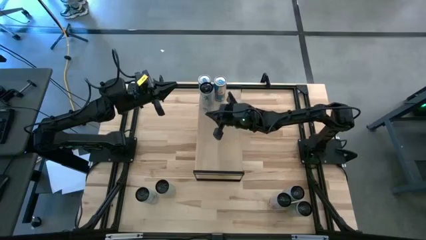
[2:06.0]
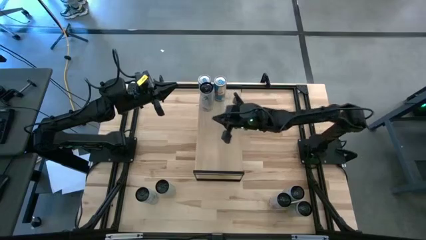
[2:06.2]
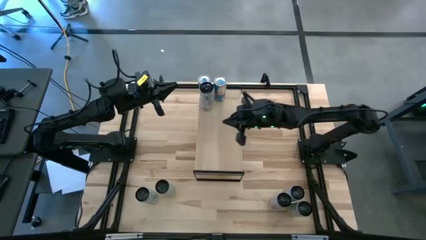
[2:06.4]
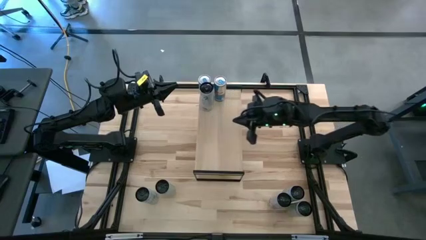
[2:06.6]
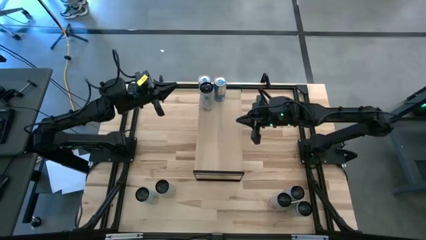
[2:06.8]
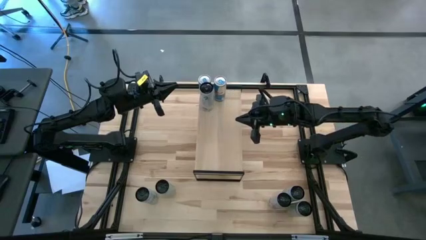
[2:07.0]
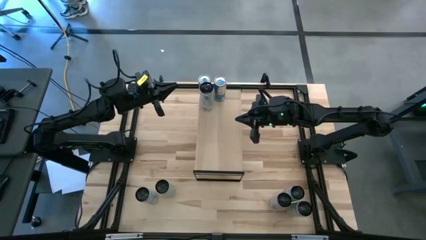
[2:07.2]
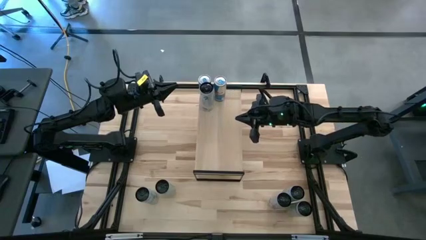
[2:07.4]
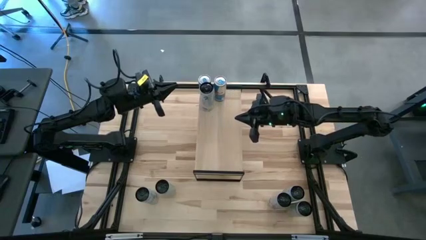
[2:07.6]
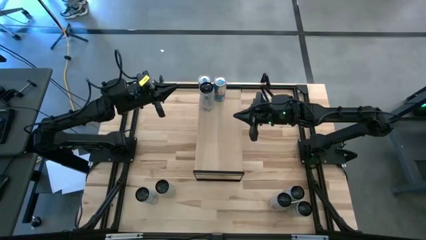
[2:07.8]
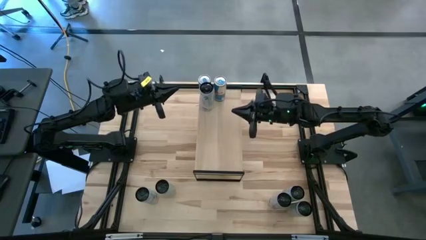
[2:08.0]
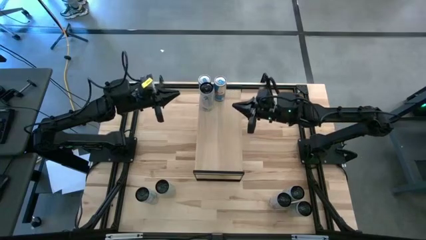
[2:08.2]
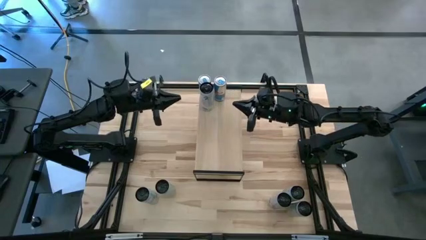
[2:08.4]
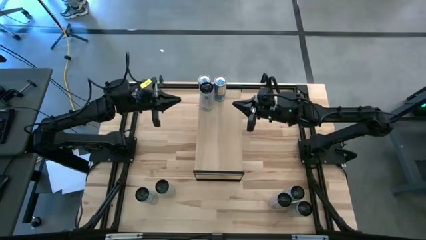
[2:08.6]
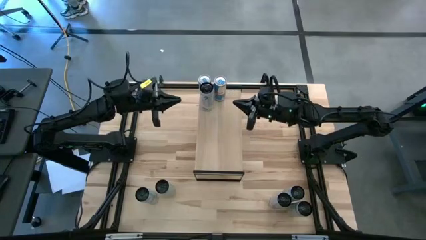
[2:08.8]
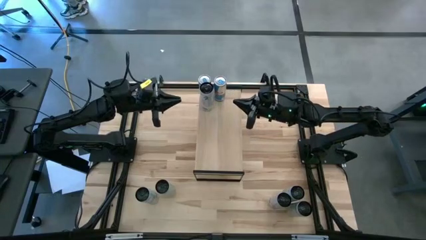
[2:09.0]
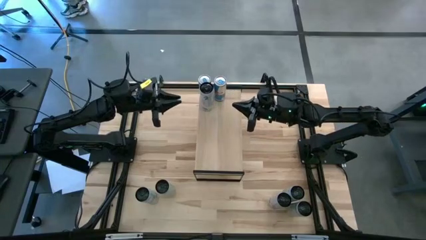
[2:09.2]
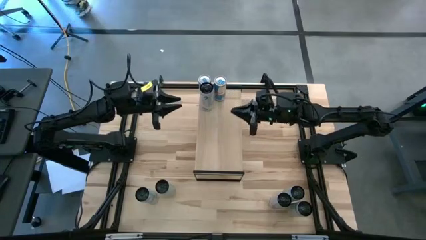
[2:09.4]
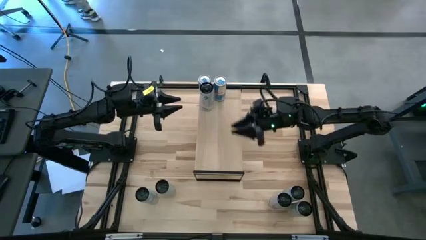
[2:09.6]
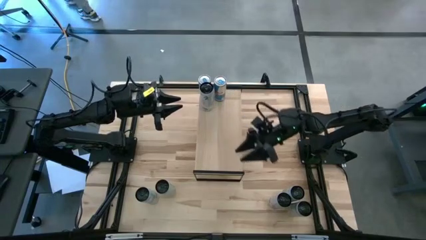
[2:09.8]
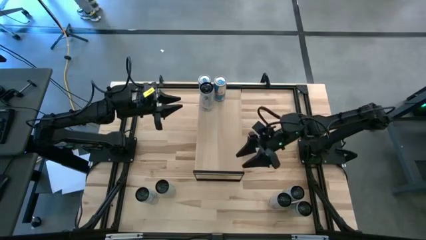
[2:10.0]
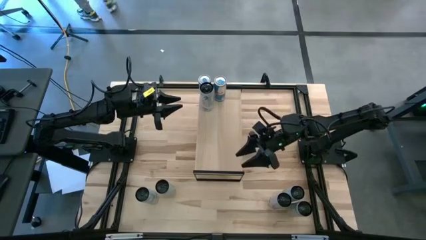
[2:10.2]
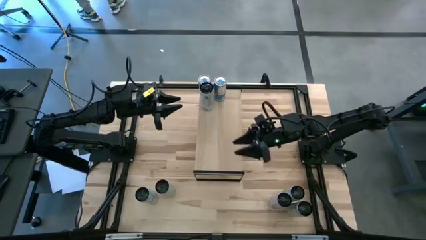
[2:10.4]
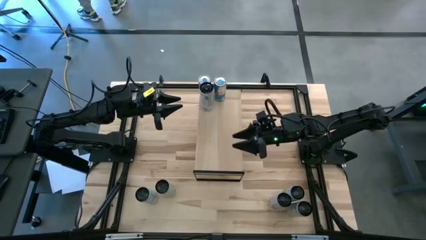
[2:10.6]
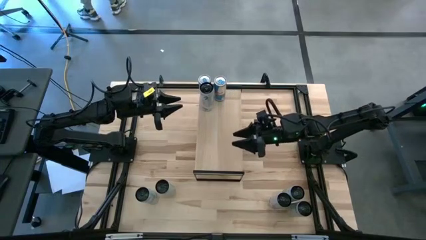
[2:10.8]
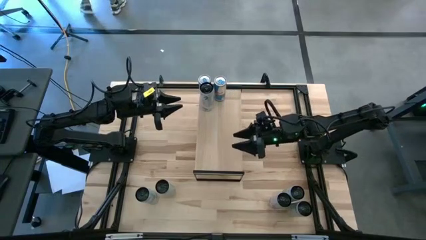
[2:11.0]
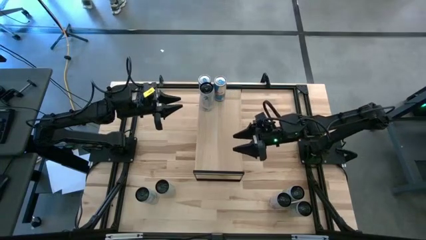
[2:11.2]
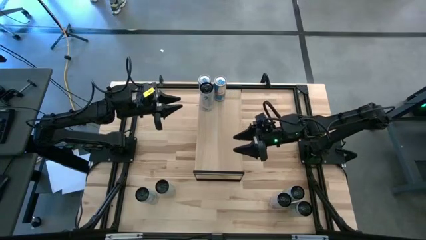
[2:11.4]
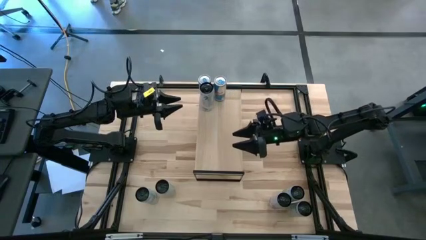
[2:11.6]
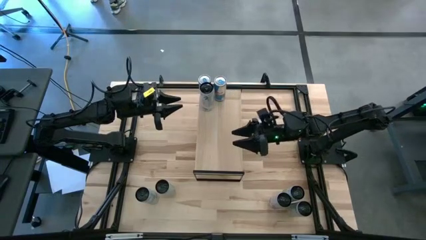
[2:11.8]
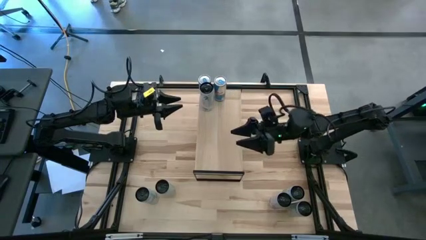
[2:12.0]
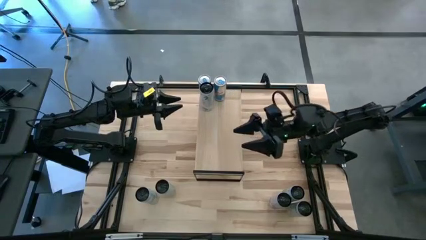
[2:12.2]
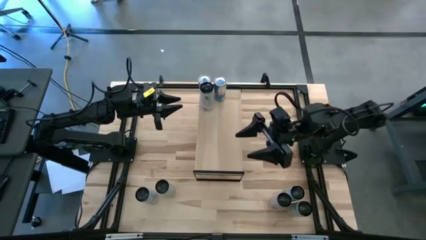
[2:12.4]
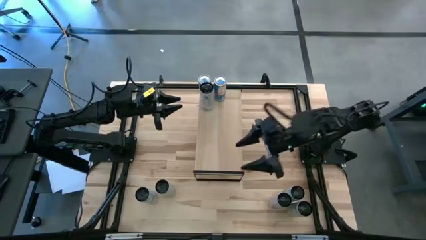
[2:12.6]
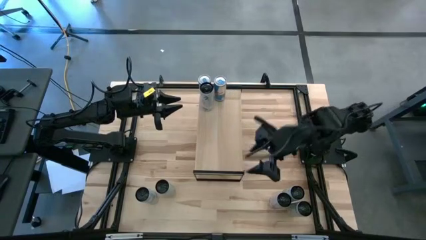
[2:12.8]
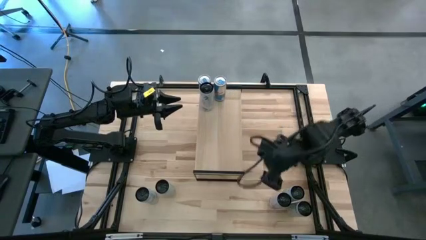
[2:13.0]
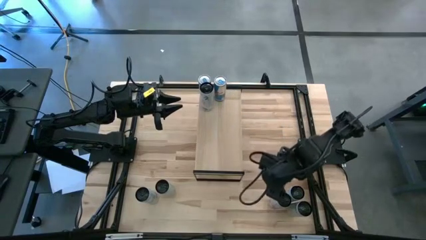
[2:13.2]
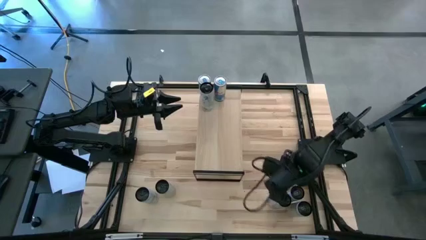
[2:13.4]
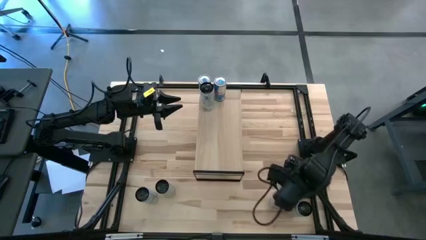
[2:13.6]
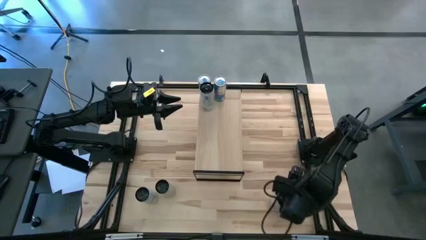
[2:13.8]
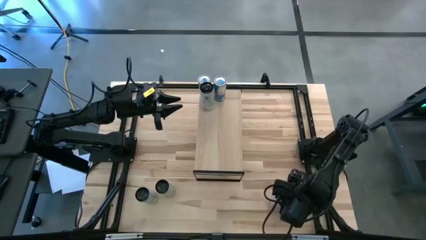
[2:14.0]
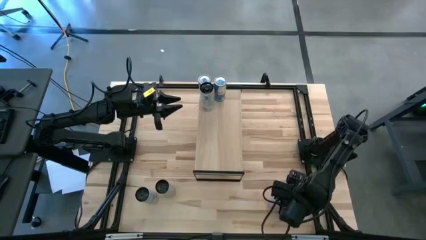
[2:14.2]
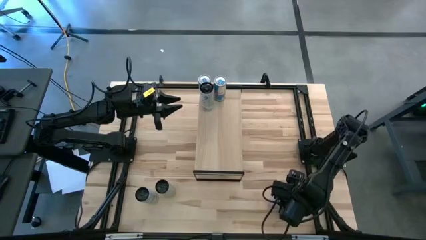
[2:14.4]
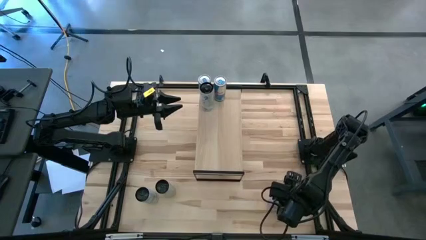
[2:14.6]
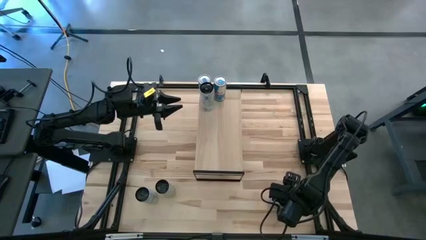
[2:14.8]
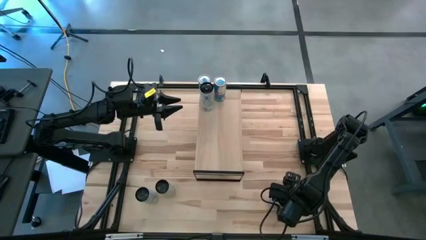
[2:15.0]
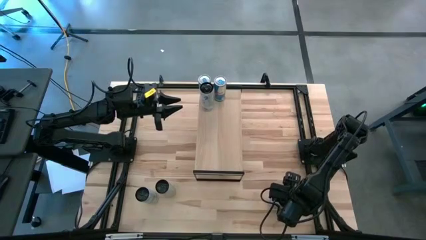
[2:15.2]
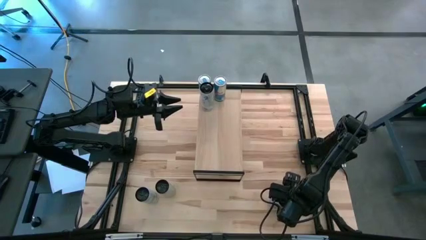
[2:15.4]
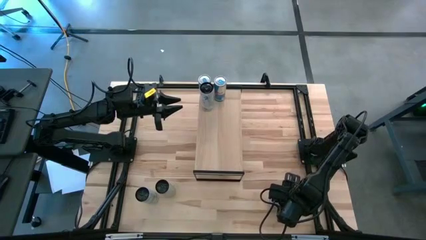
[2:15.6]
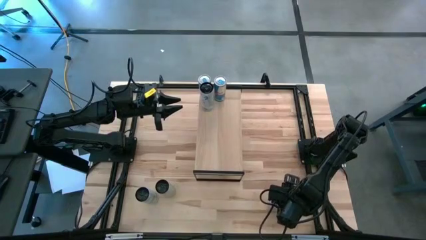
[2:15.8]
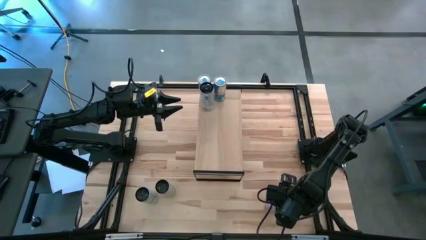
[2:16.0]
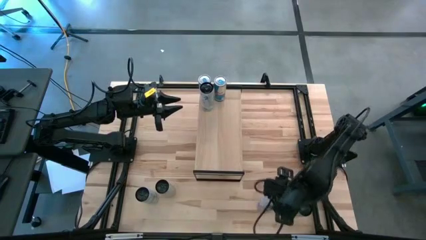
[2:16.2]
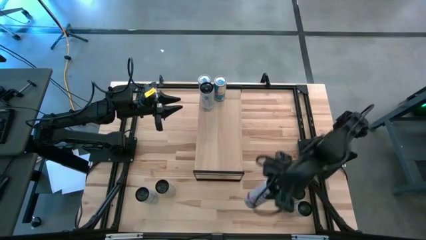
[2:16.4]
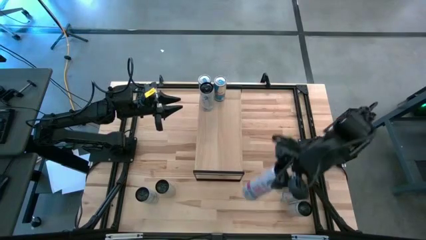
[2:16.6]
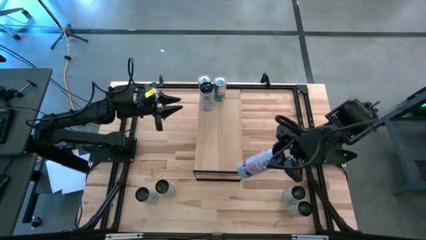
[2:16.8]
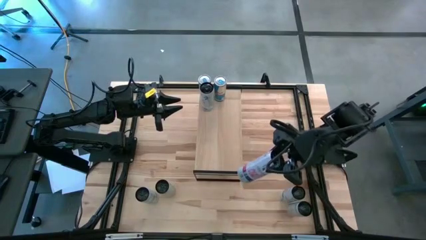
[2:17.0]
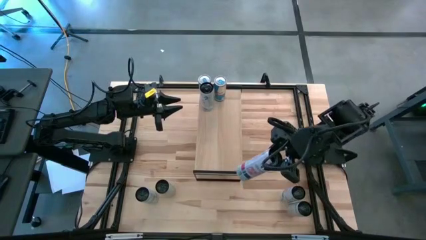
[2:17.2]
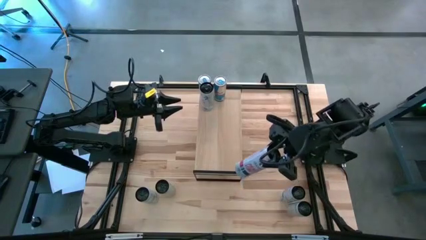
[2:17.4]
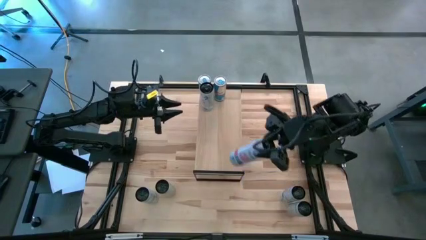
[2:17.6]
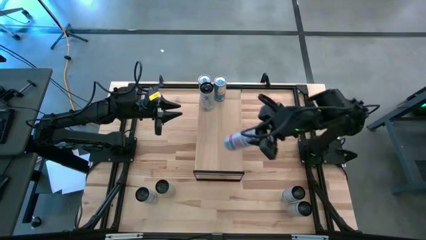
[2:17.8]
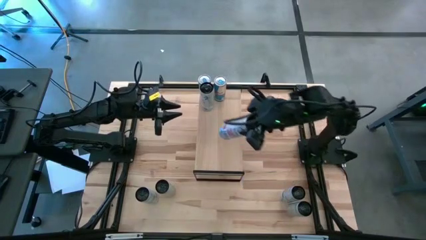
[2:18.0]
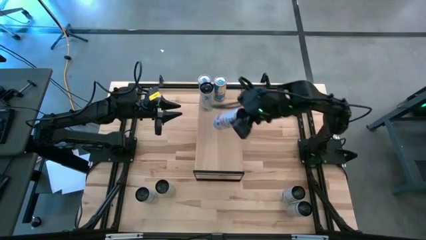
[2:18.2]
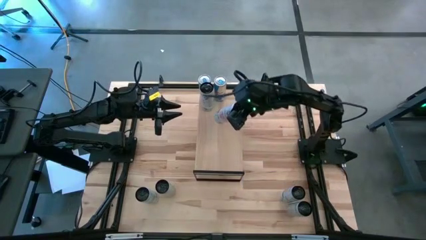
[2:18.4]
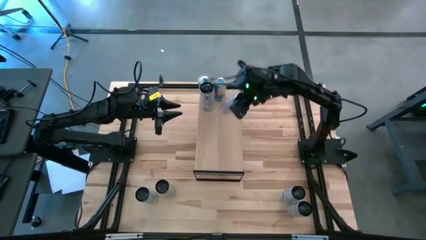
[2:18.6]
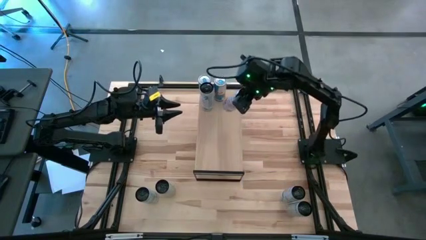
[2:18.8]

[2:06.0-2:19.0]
Task: Place canned beverage on shelf
Put the white pink soda can aligned with the other white pink soda can

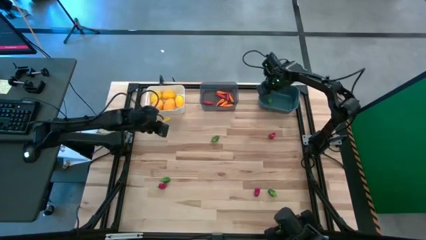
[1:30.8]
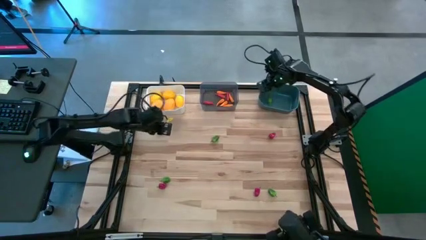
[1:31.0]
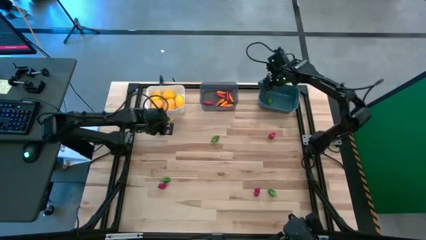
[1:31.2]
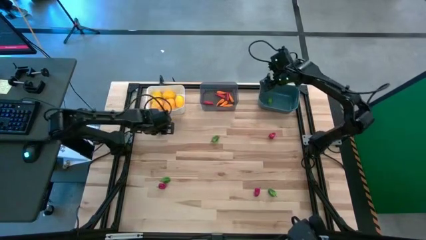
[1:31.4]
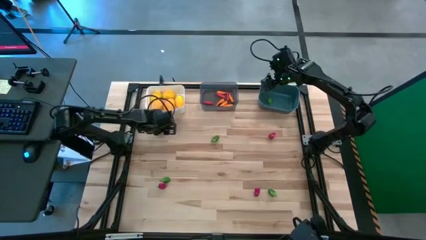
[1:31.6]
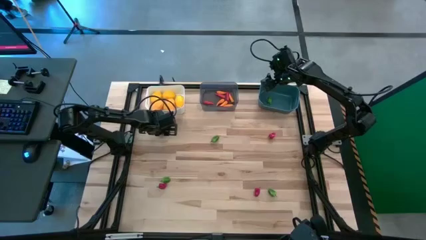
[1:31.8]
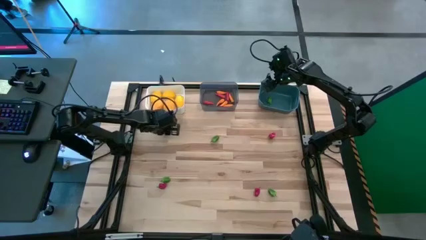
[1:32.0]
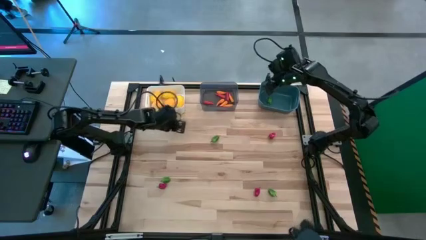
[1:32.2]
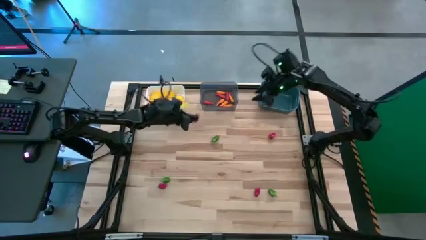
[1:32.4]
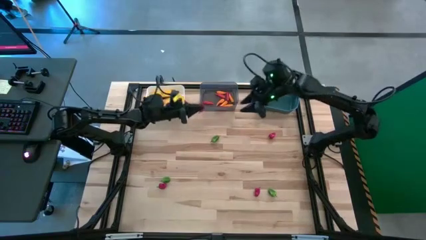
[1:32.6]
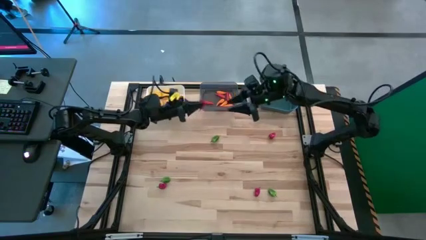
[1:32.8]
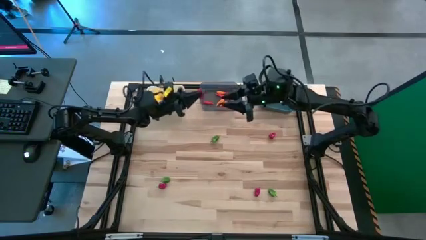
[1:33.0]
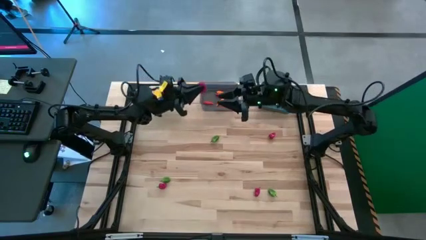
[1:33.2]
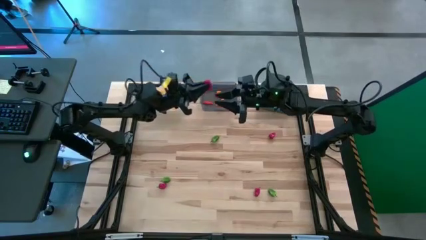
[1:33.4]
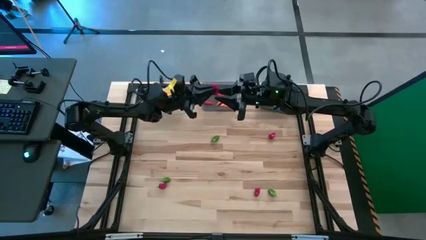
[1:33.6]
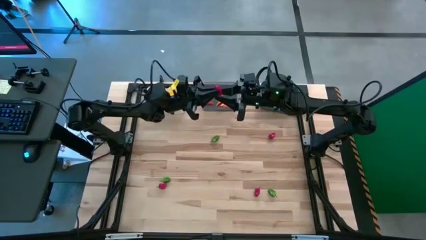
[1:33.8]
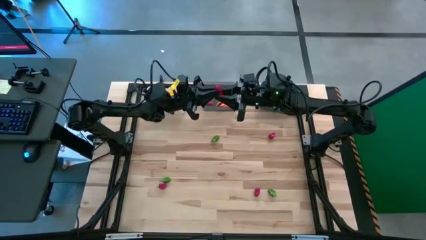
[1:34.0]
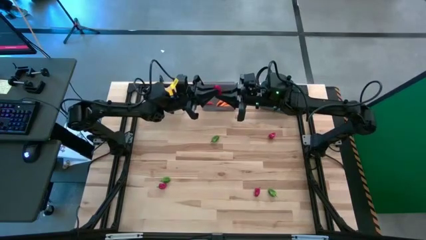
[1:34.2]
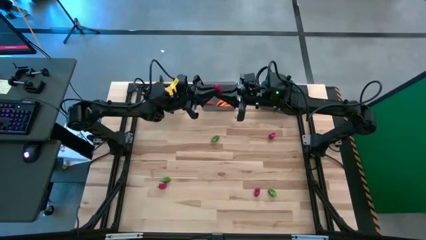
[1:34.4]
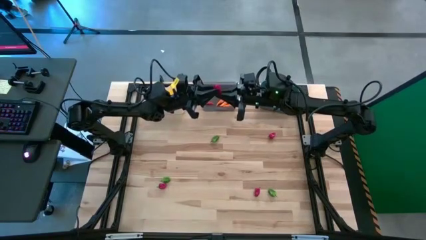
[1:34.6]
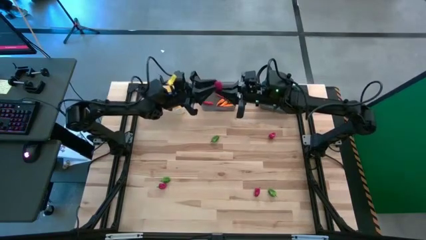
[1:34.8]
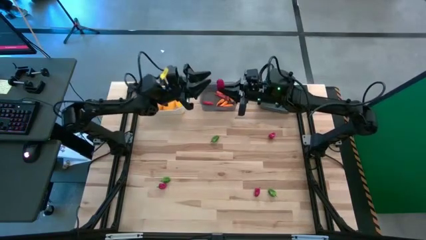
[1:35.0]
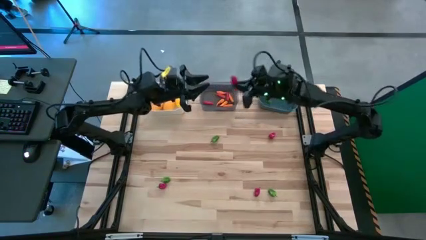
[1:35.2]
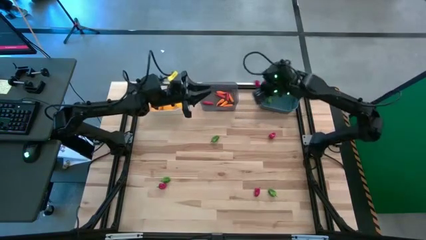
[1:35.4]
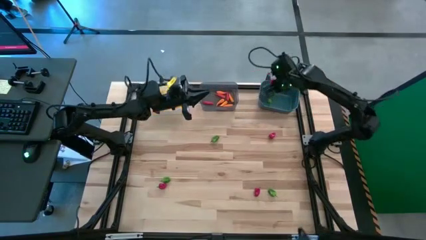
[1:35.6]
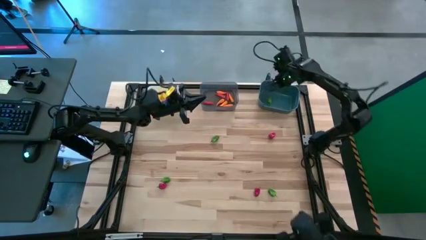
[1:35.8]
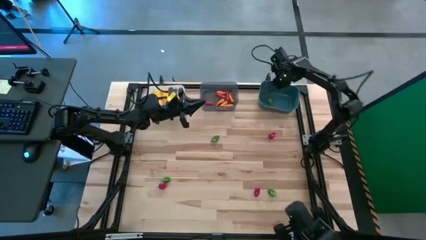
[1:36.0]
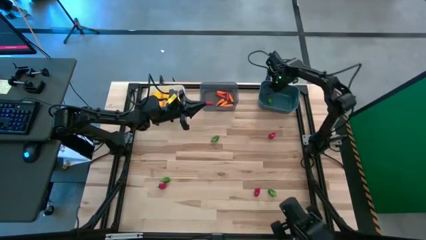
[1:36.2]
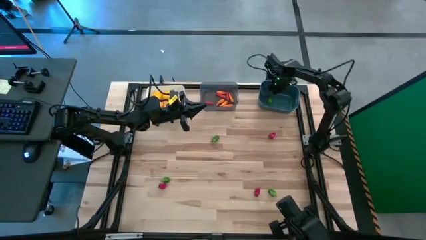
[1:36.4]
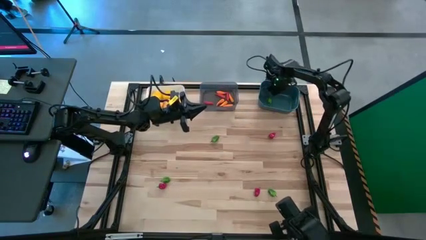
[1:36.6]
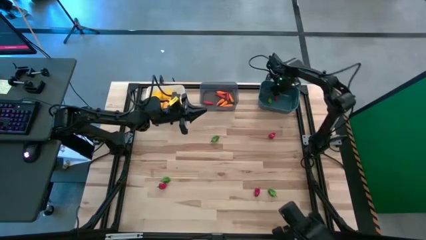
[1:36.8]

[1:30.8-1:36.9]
Task: Sort produce into baskets
Put the top left red bell pepper into the blue bin
